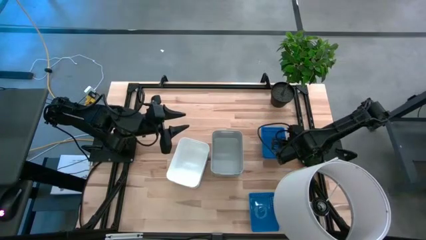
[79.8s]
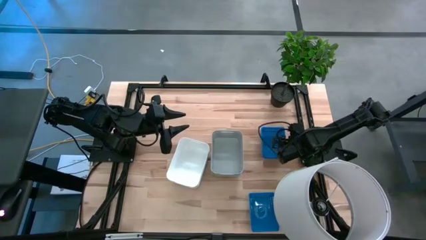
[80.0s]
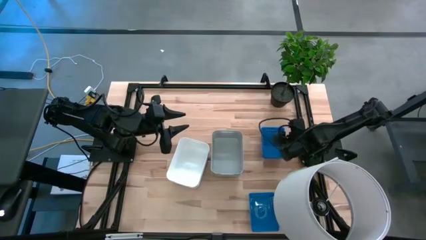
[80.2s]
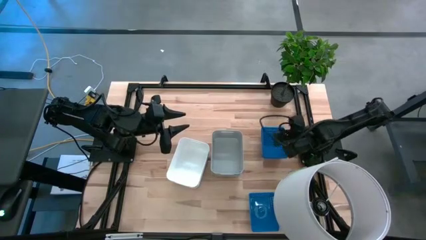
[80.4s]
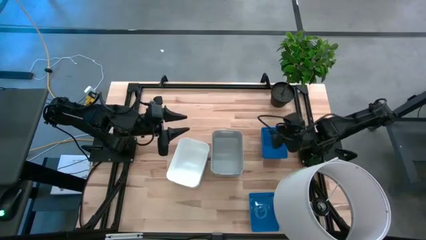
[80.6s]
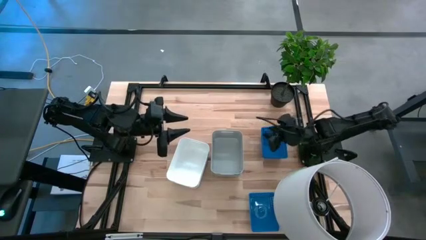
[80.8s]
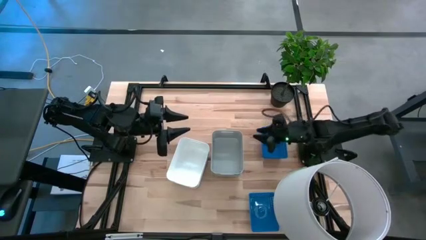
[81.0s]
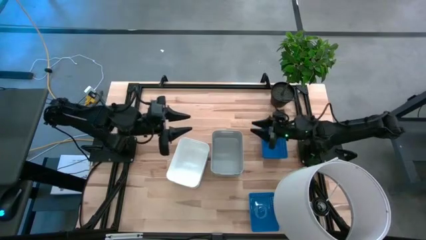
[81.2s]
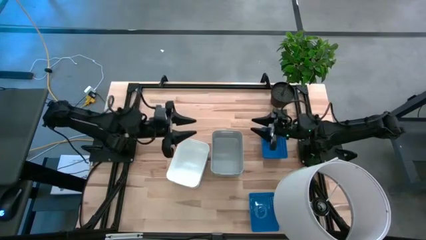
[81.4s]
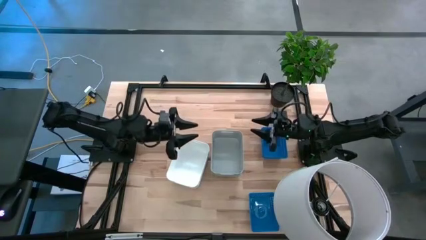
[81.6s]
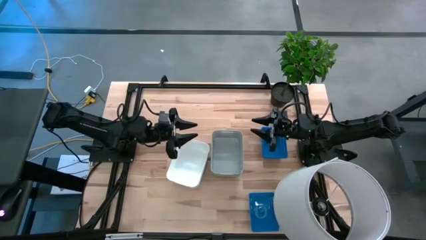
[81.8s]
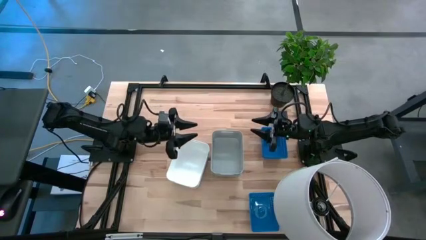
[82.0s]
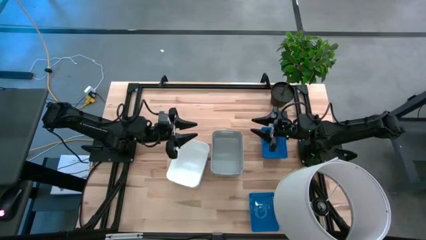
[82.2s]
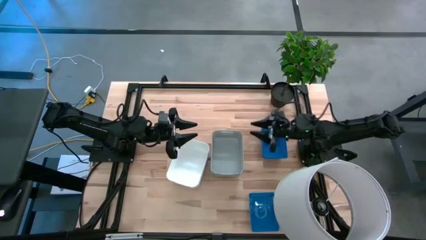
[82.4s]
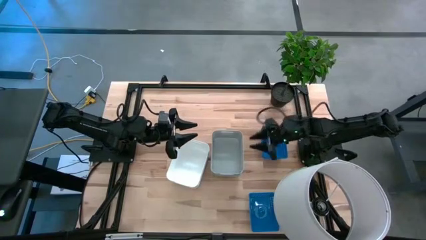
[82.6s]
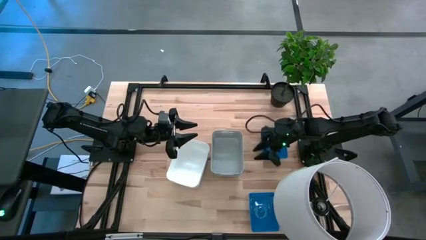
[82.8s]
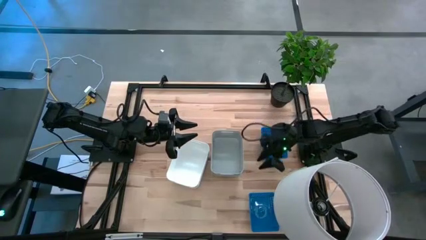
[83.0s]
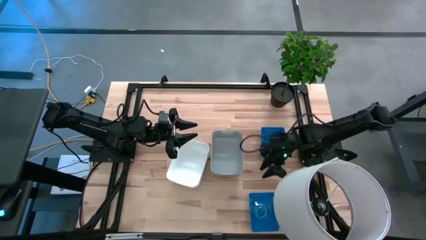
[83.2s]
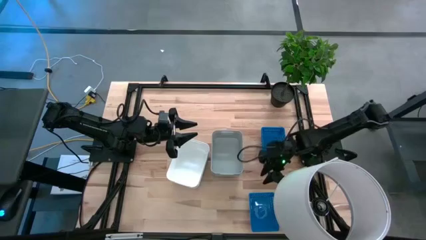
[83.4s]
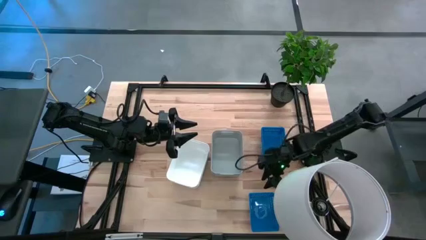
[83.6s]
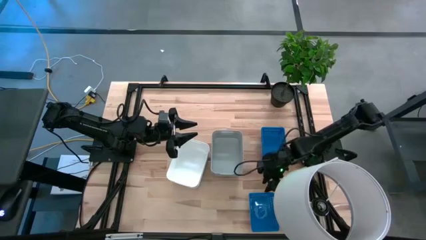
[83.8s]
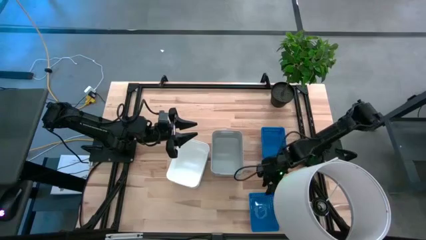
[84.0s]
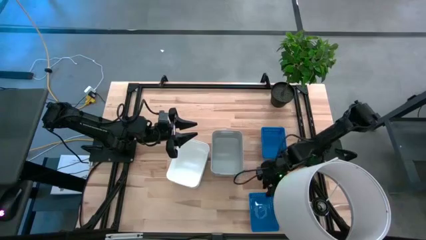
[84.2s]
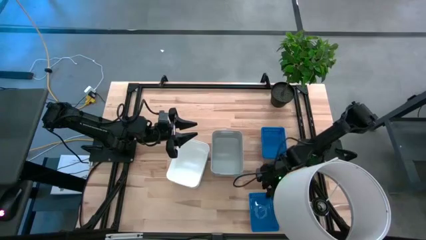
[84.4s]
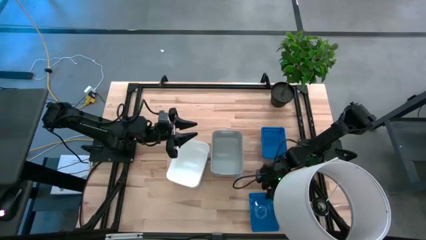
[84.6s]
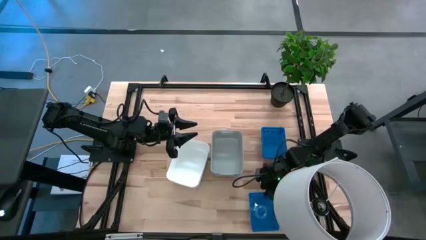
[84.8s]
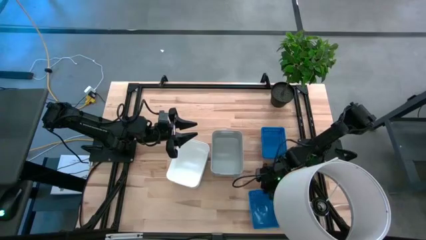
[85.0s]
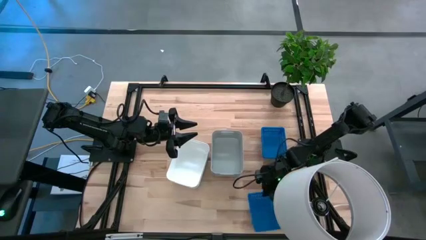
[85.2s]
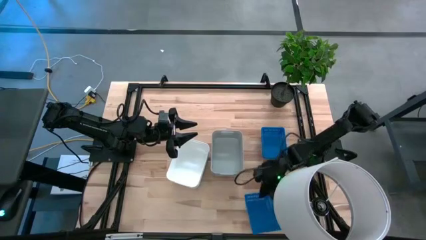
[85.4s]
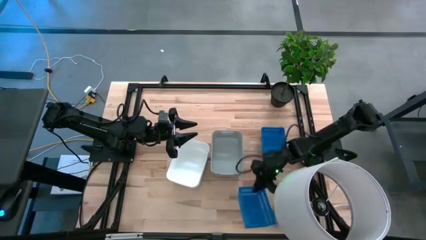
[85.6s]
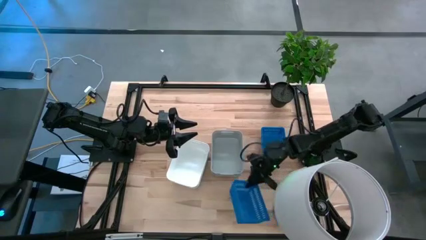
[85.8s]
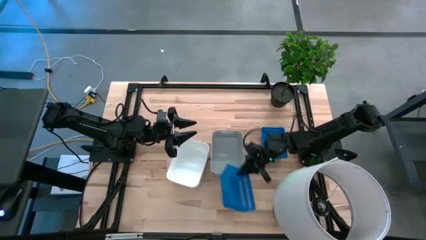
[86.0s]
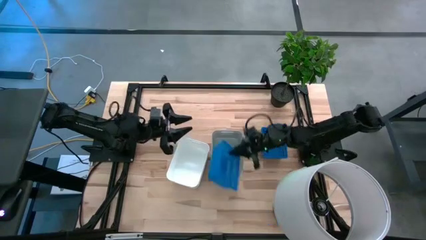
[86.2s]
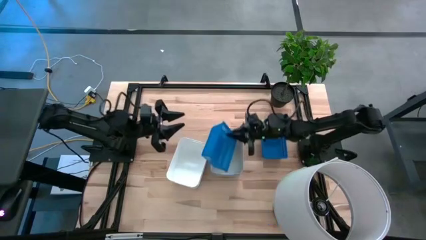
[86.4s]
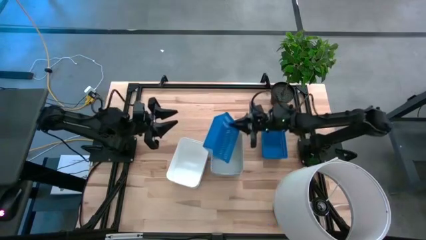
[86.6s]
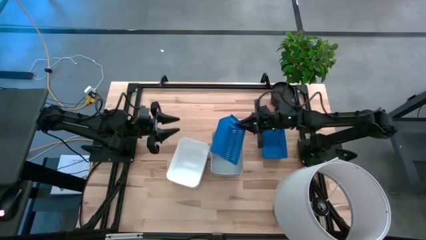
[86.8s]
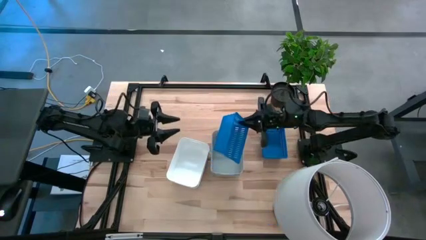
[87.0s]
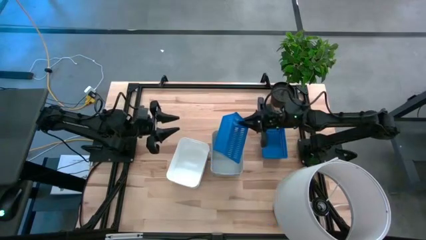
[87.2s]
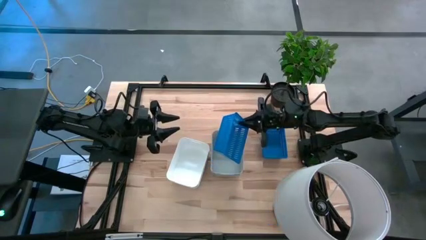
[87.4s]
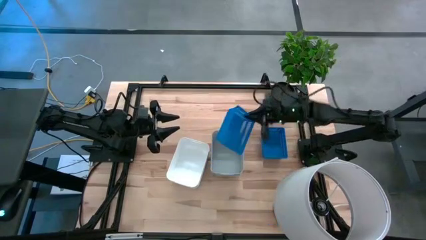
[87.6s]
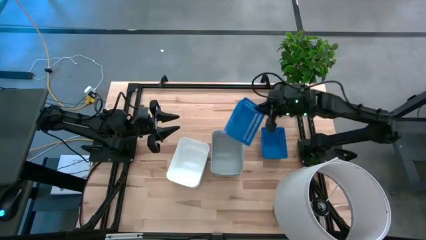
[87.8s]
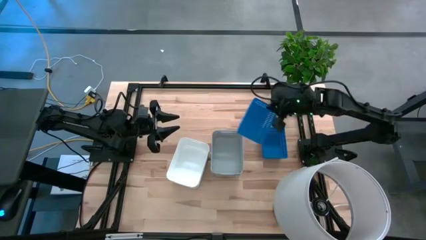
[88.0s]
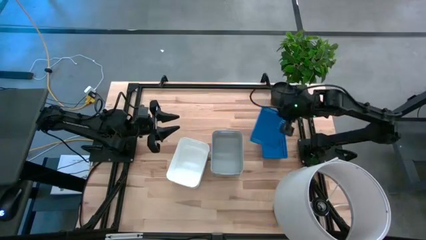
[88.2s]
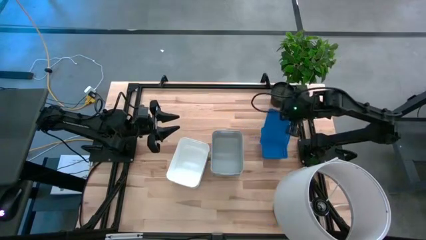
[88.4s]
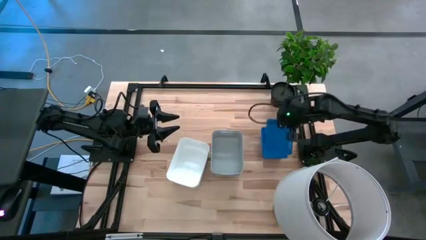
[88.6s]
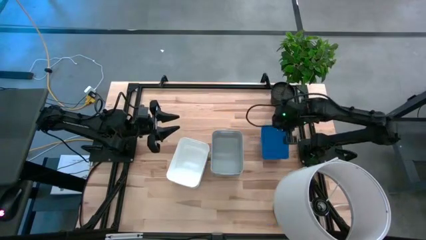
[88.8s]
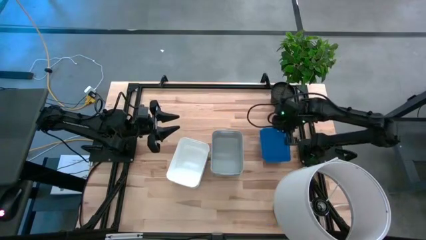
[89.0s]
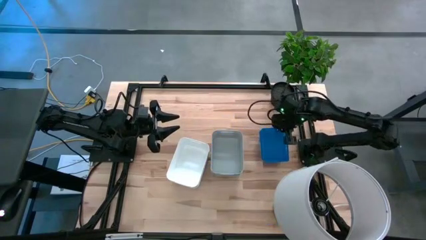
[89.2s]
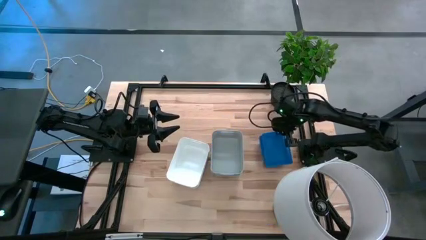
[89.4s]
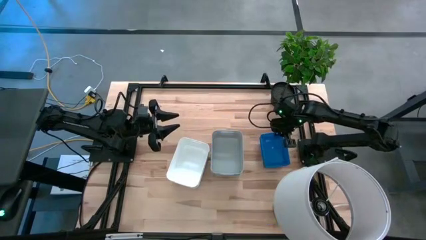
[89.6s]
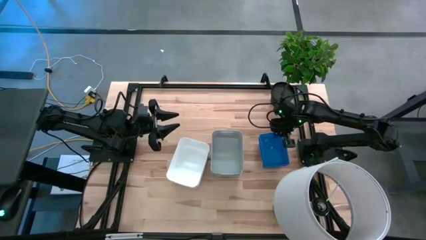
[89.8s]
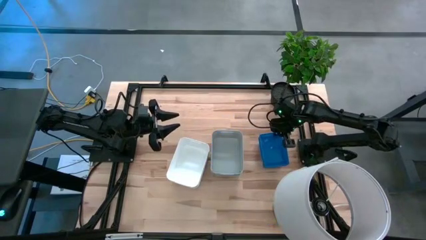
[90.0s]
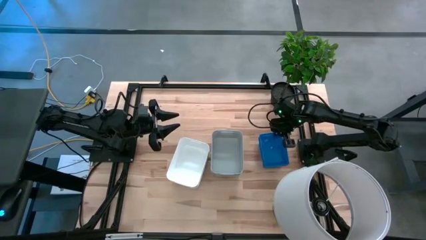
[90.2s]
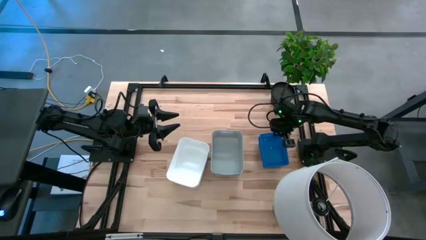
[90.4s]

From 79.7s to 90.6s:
Stack the bottom blue bin on top of the other top blue bins

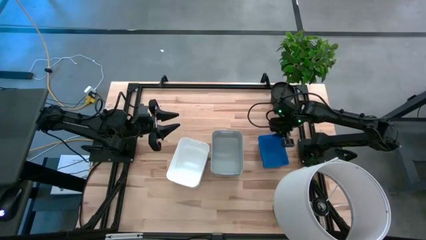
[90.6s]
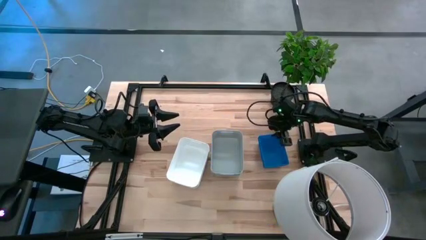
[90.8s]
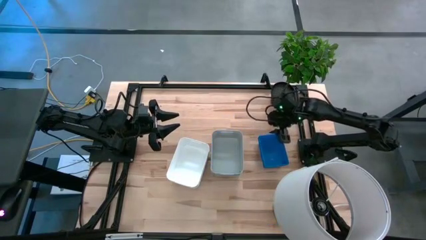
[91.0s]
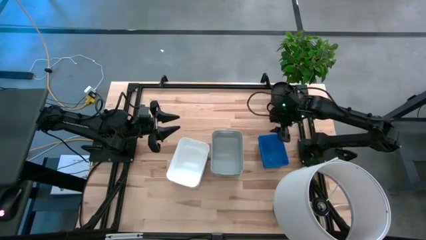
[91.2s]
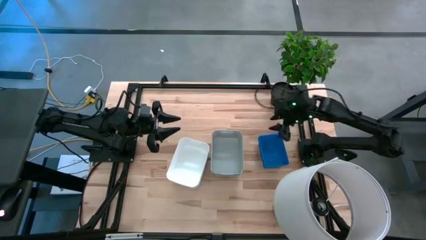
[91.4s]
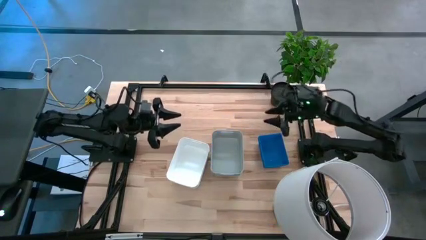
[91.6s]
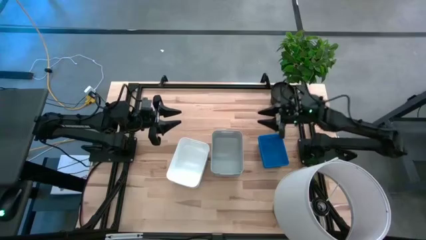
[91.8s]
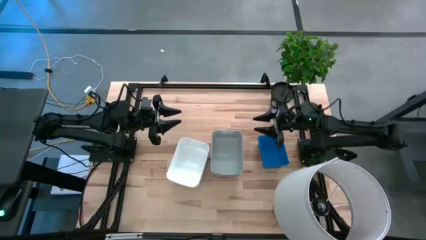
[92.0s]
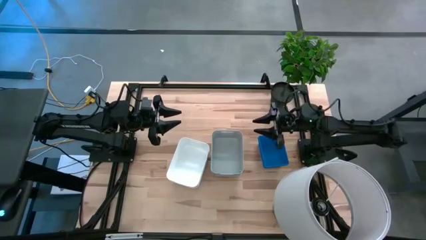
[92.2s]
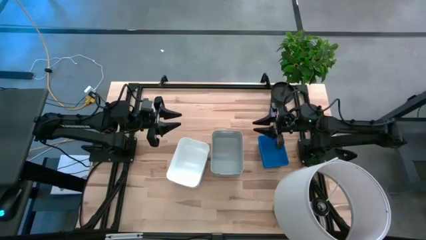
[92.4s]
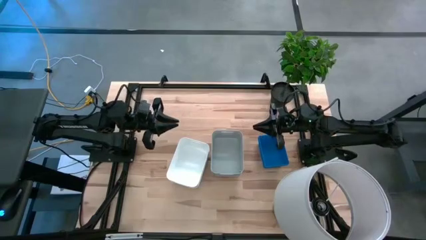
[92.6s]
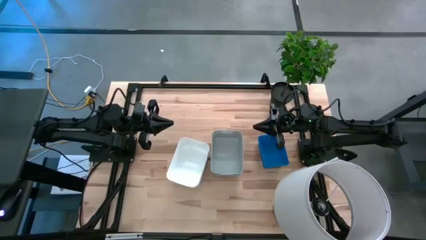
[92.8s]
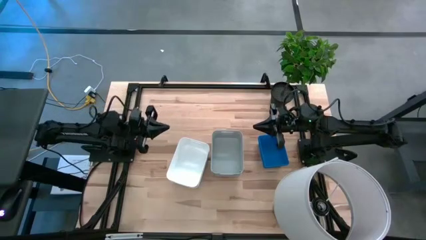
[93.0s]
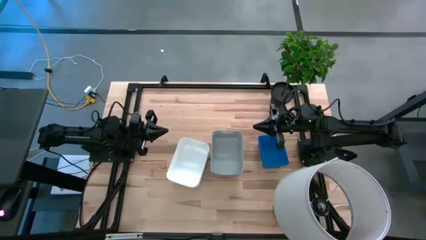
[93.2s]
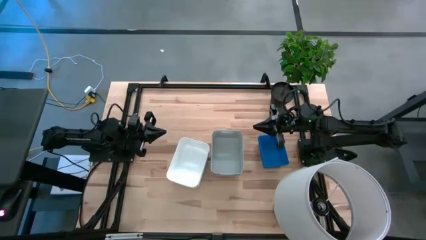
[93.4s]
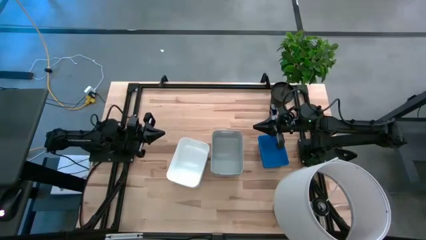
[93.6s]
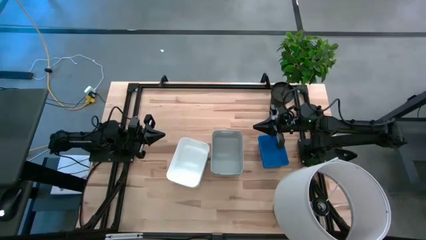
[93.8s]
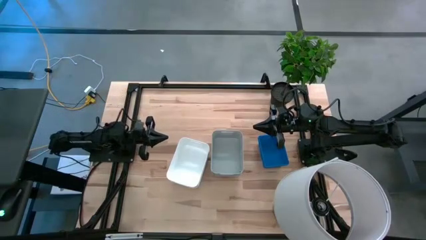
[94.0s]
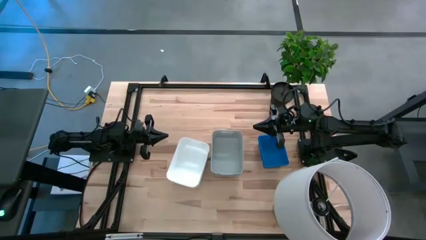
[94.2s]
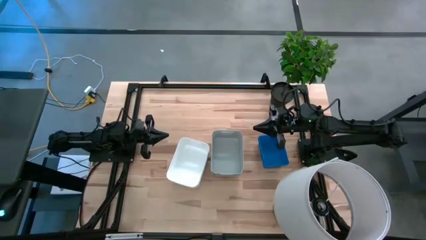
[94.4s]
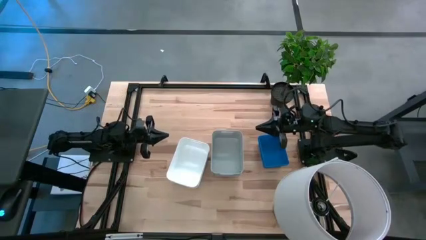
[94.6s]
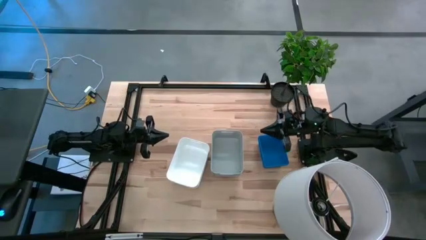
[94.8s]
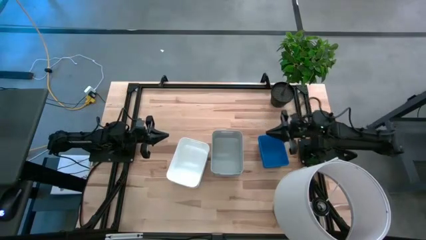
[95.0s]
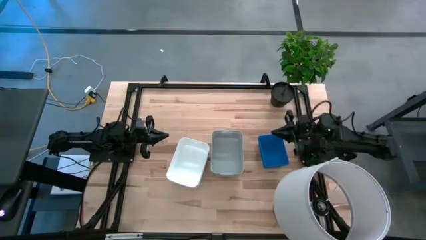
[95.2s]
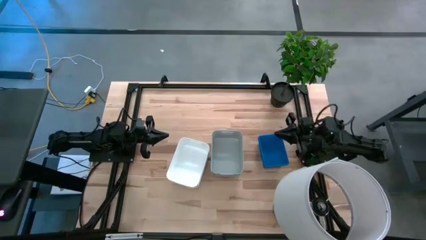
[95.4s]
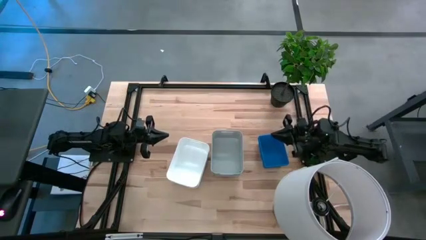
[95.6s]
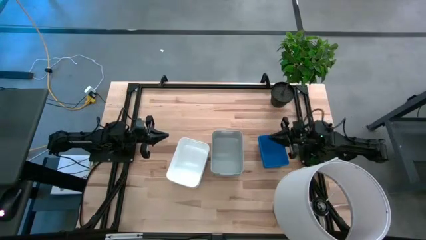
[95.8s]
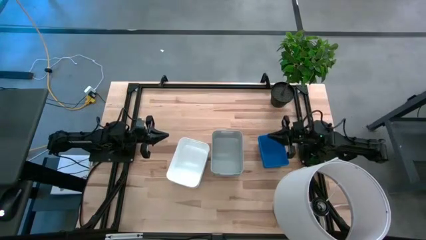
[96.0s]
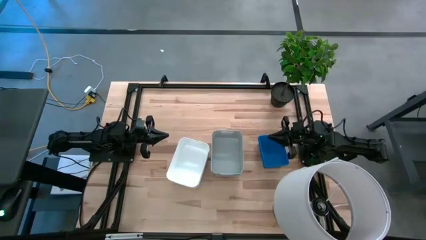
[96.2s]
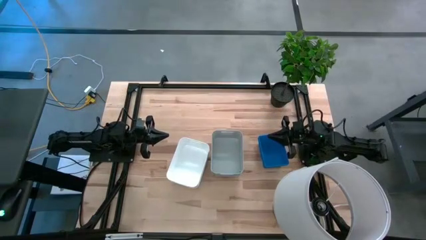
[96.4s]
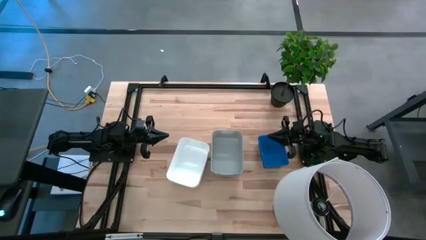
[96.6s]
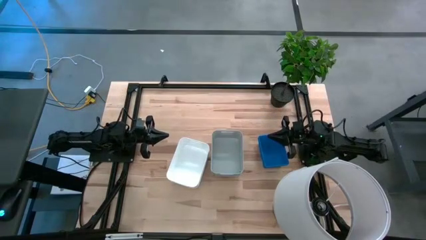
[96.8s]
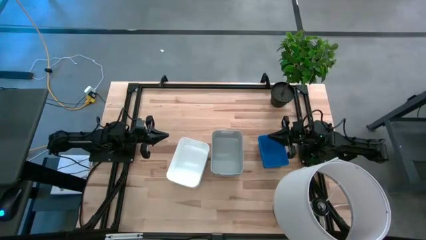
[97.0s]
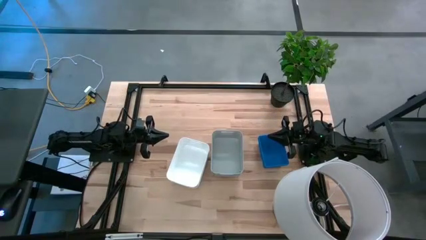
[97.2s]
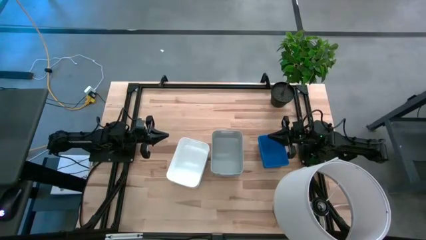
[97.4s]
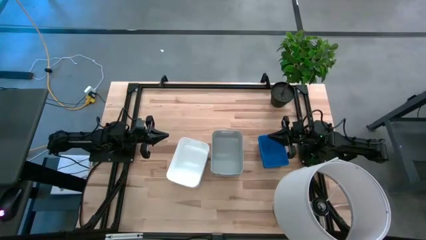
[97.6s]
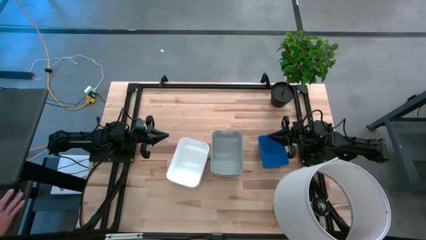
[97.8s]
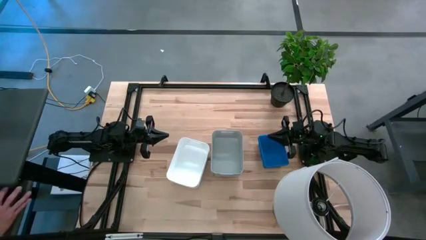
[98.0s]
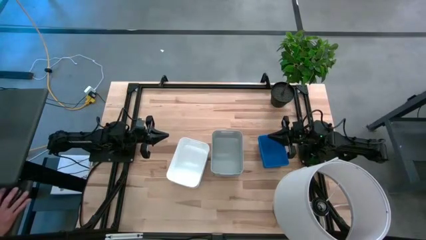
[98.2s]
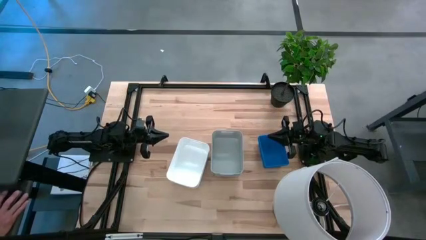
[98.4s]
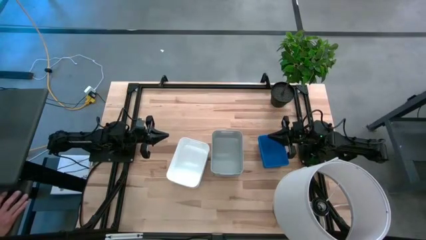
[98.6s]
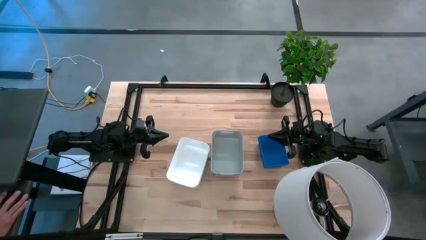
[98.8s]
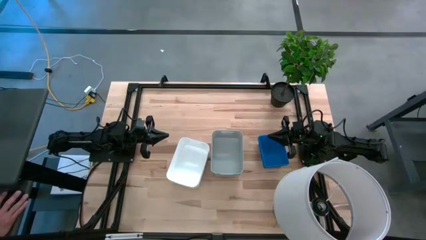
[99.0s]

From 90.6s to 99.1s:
Return to Home Position
